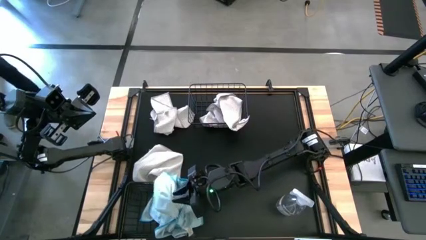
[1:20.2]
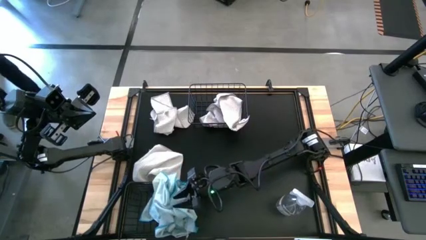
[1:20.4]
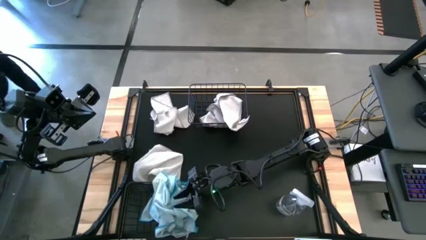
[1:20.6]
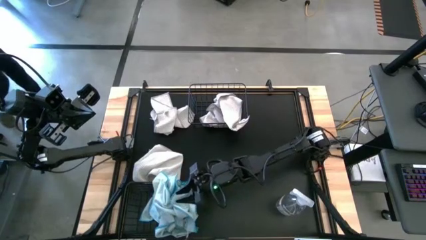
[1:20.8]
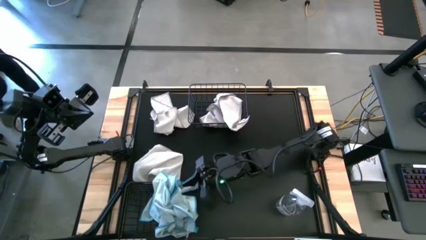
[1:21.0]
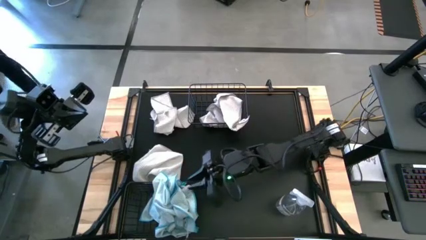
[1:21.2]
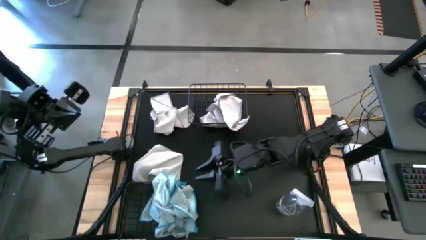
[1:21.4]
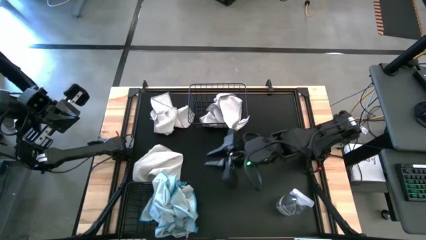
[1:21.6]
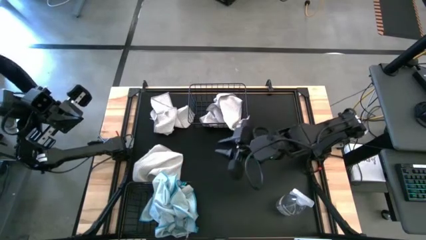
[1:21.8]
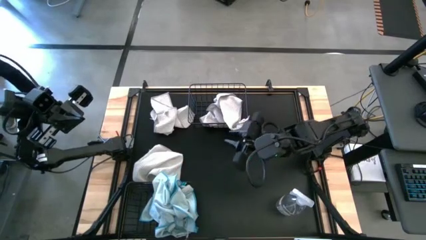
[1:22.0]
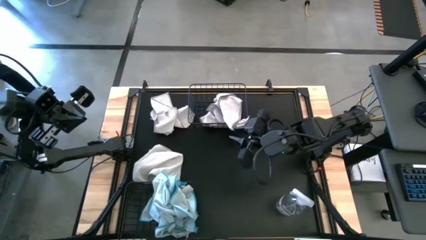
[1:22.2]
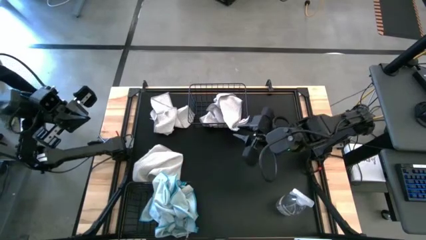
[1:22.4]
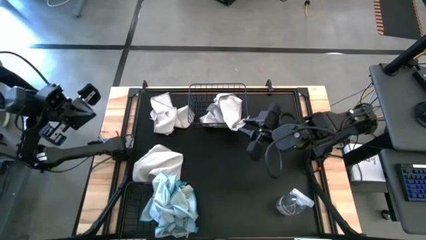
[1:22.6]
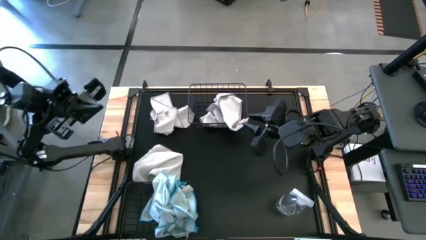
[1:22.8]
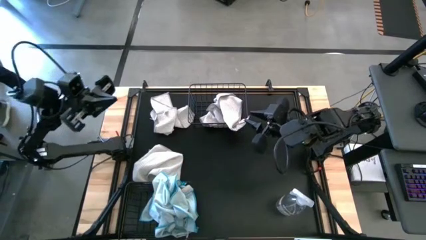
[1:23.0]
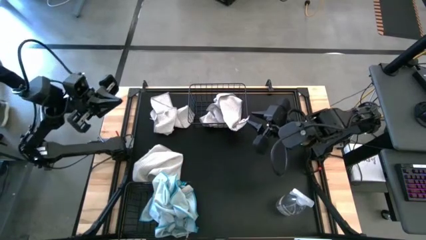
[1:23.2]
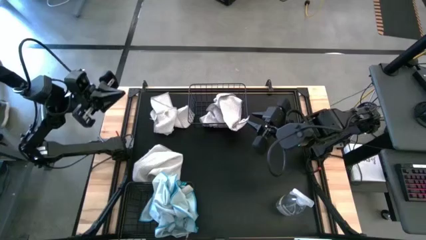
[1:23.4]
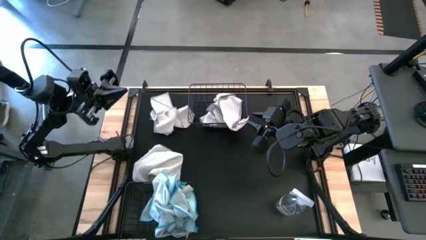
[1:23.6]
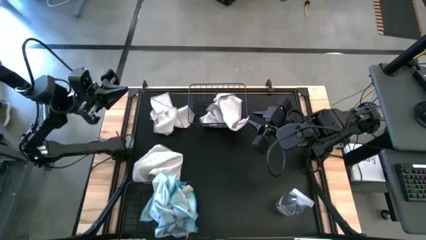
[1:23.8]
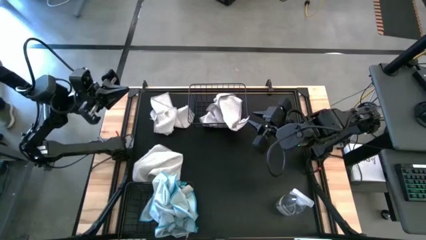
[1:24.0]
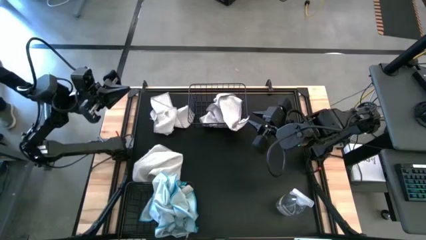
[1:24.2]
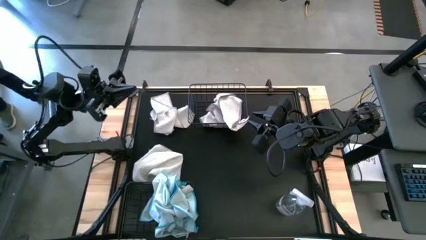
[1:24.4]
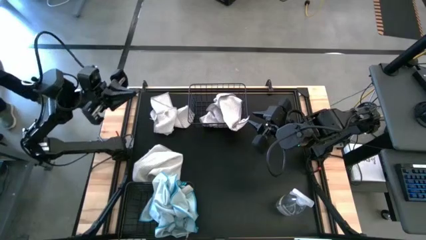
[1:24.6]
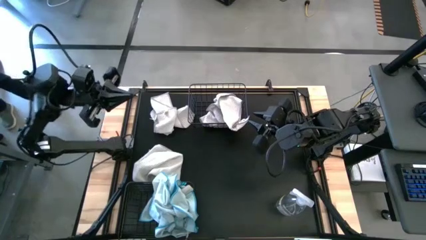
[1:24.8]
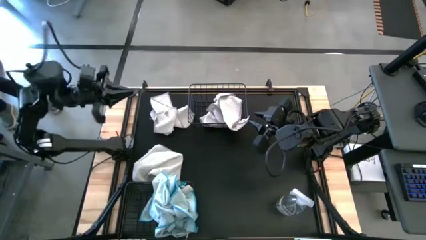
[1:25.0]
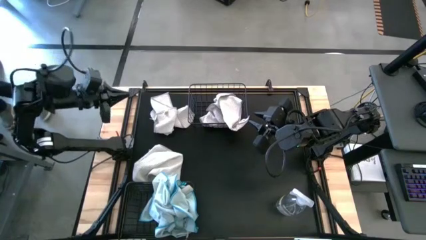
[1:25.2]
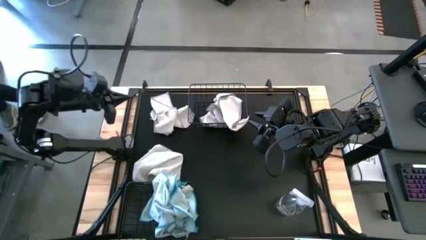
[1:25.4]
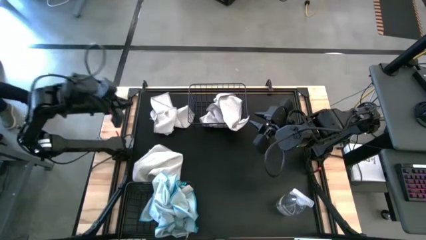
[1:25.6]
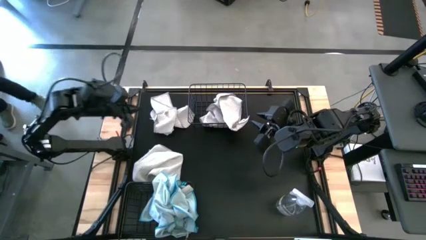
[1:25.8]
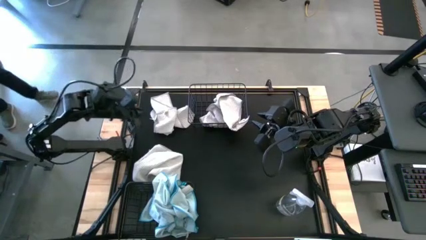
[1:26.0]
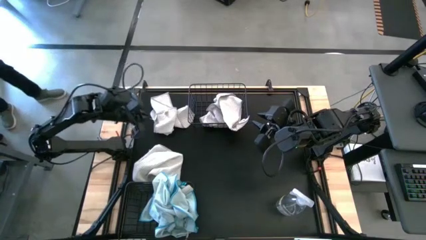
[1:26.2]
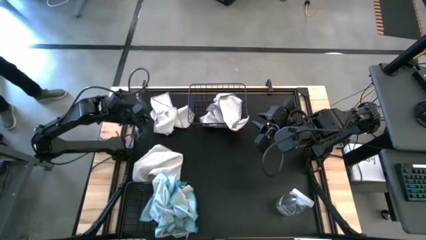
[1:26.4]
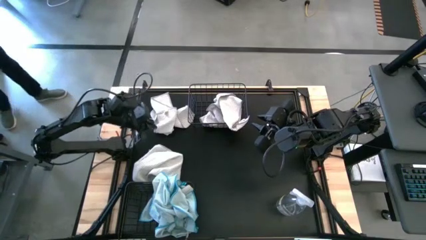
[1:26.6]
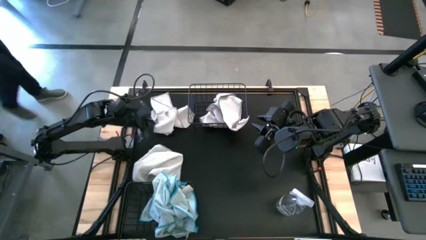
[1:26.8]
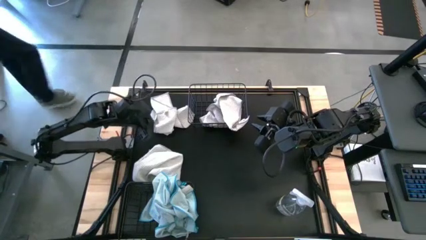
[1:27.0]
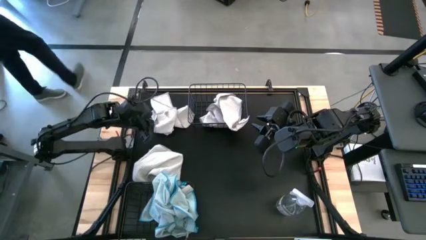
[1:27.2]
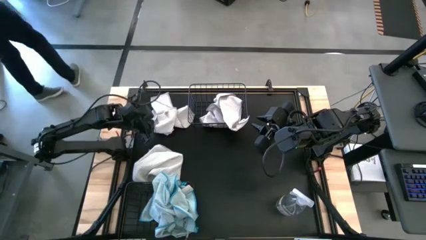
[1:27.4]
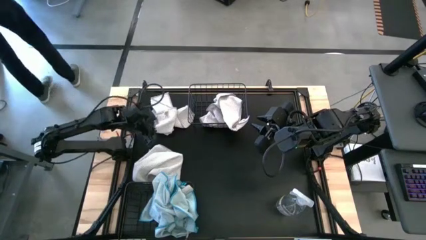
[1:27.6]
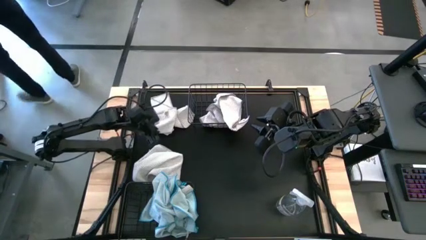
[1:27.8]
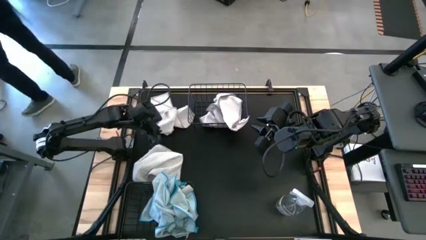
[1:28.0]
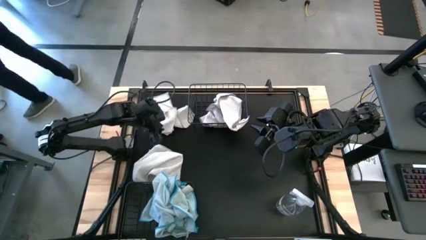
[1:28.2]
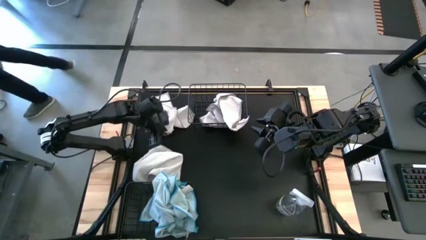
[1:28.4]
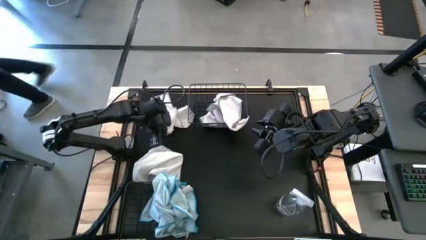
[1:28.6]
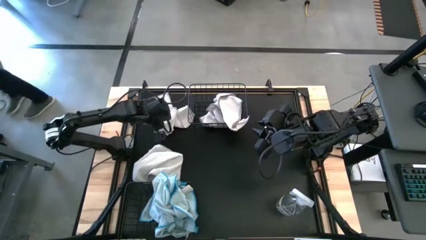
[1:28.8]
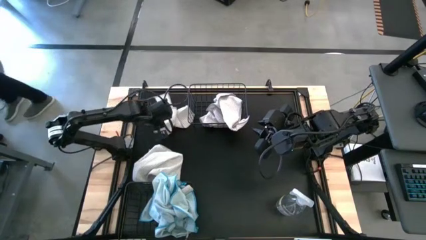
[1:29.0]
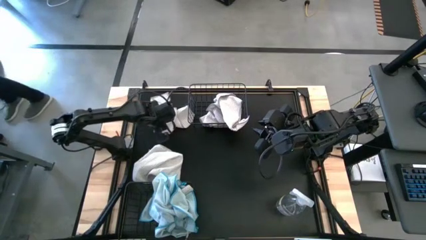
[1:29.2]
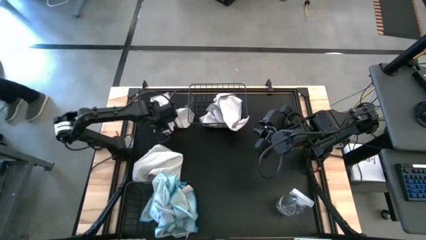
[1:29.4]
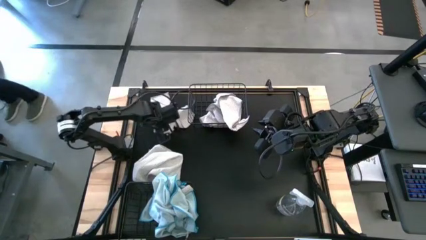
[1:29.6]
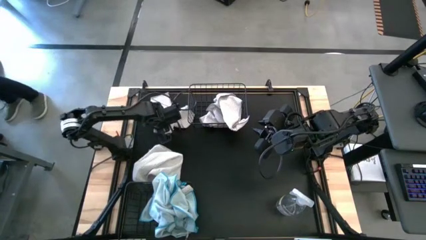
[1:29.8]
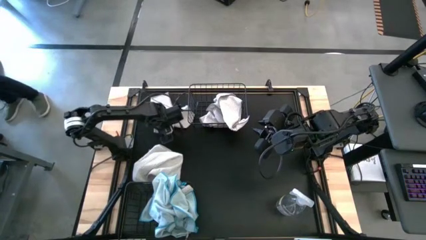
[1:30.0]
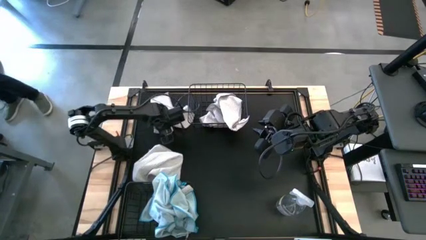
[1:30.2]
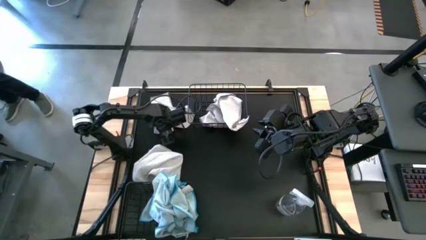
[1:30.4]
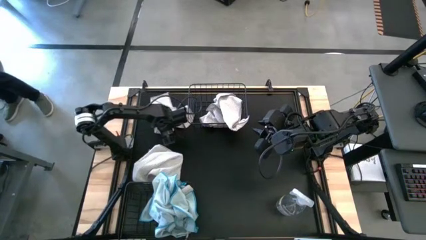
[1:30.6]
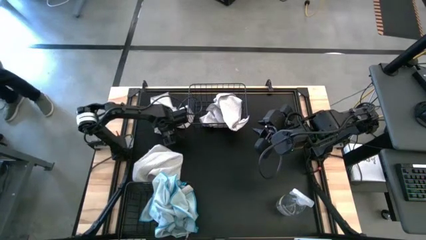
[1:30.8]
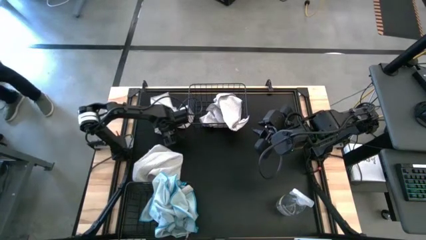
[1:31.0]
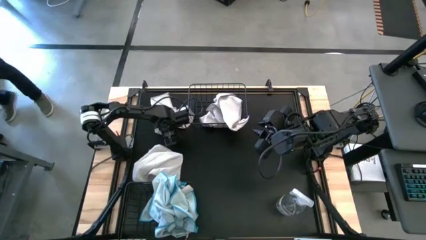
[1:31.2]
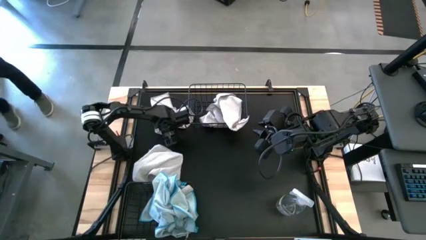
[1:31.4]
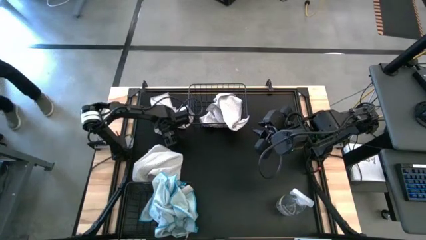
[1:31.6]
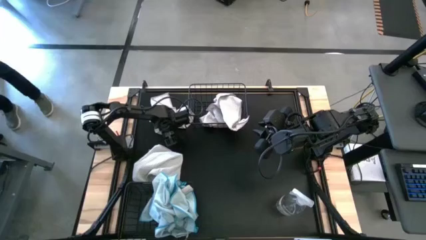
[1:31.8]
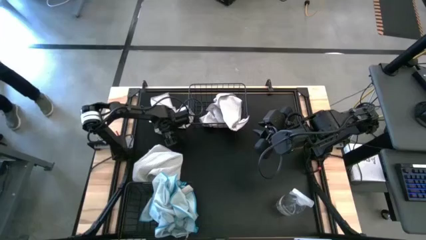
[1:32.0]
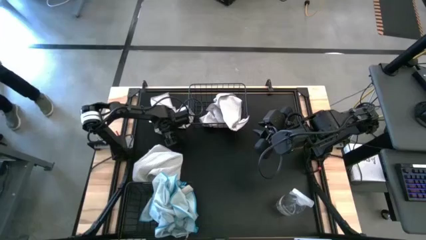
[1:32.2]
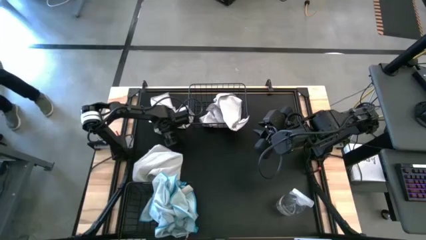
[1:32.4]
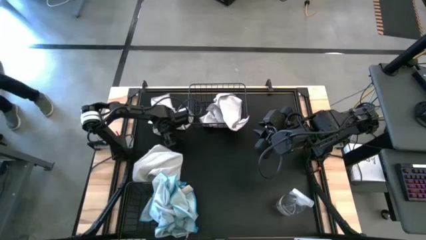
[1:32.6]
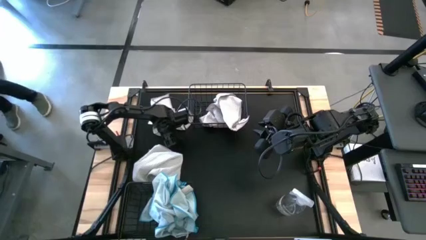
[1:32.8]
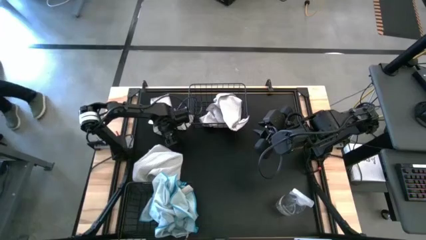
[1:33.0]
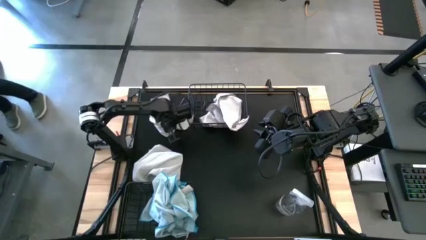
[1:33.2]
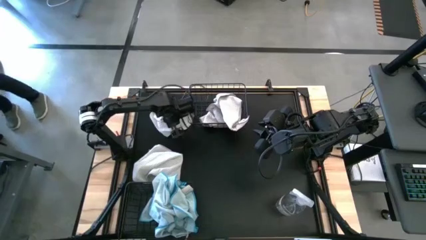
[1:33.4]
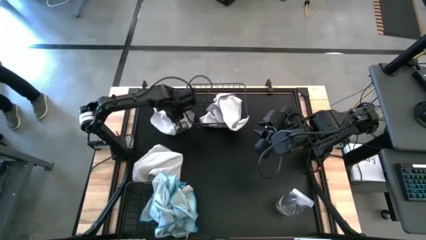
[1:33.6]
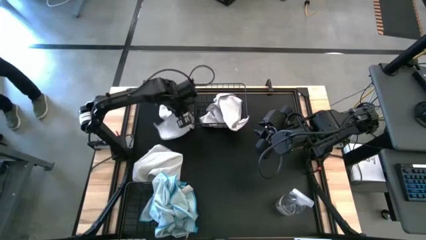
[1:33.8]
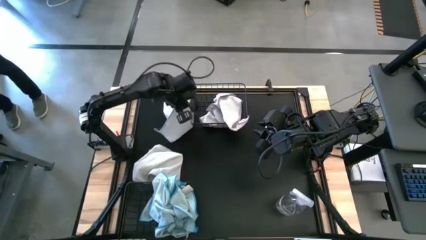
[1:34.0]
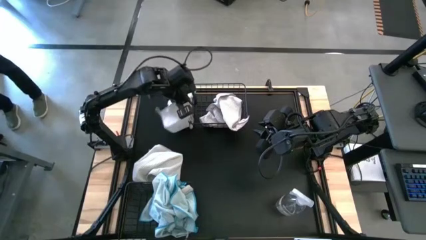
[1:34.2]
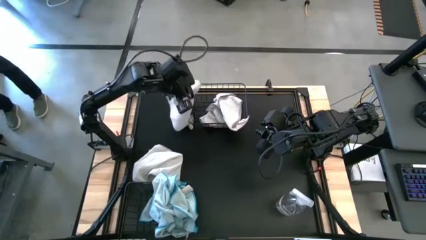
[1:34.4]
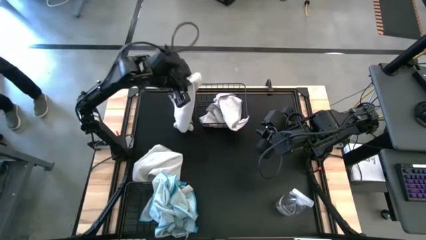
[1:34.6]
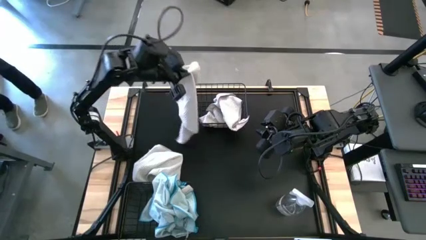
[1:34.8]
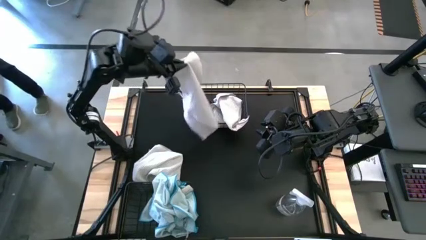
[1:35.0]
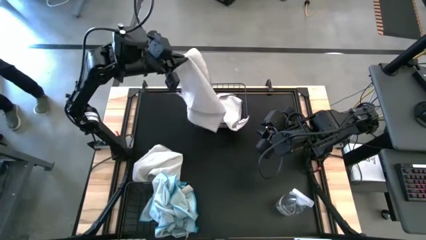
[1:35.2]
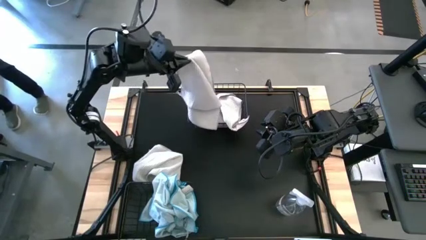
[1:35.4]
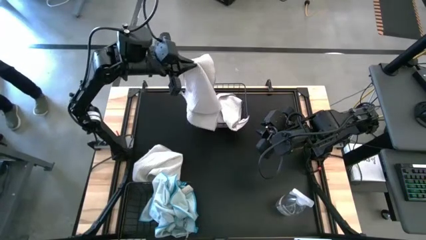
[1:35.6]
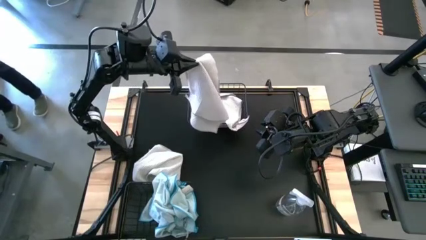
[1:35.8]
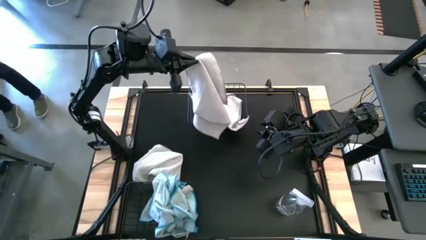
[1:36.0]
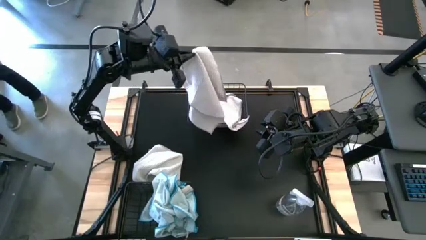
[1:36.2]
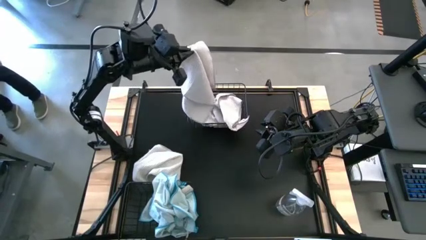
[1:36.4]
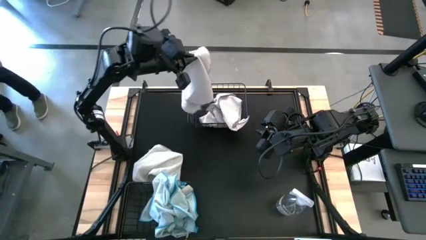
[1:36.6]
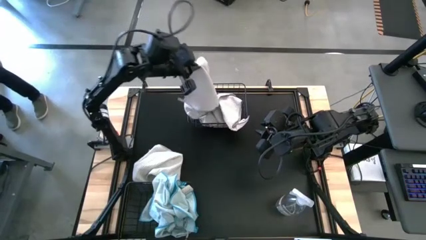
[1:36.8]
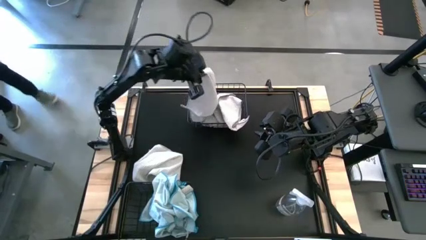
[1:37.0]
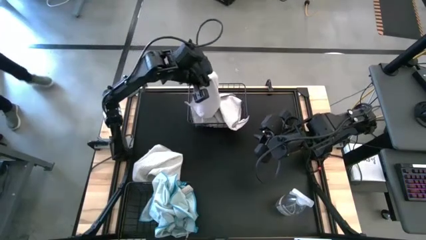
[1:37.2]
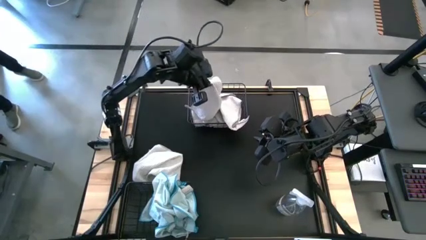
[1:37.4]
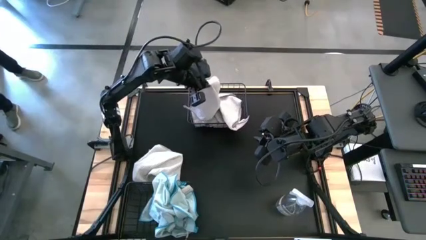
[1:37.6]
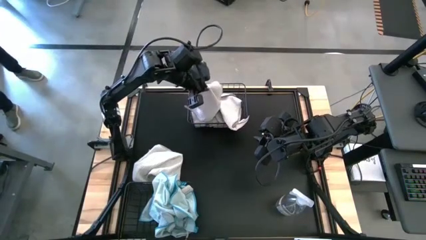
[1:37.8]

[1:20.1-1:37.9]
Task: Sort microfiber towel by color & place in baskets
Put the top white microfiber cloth into the top wire basket
